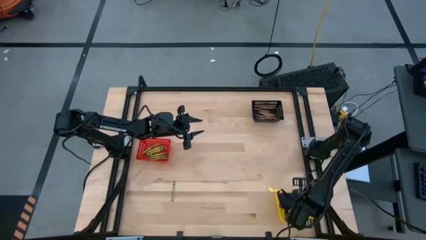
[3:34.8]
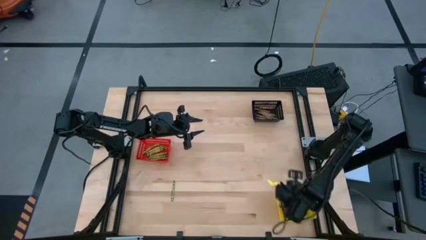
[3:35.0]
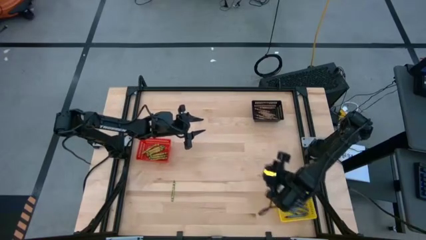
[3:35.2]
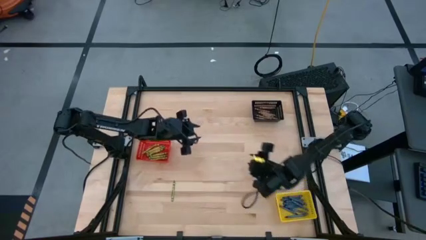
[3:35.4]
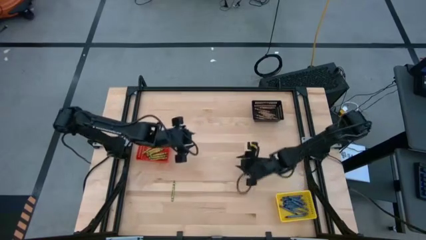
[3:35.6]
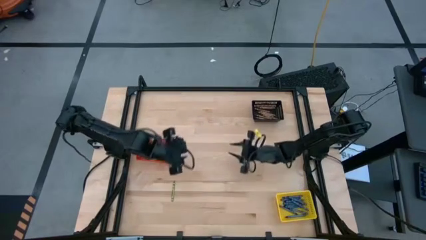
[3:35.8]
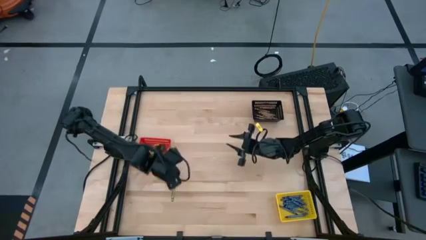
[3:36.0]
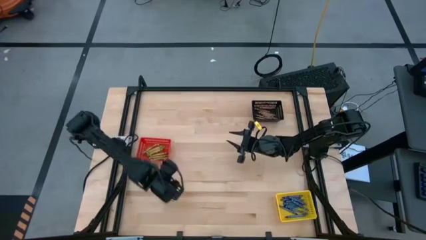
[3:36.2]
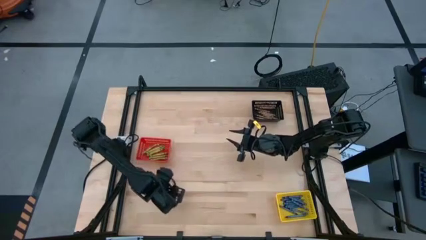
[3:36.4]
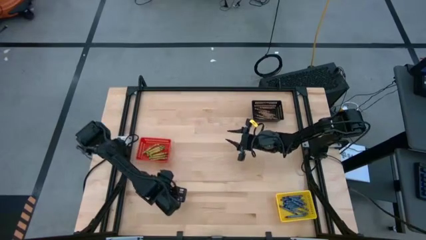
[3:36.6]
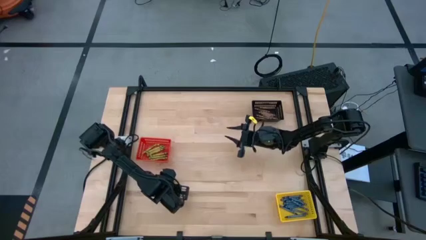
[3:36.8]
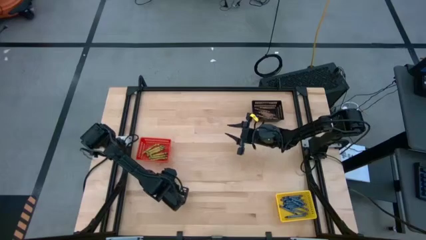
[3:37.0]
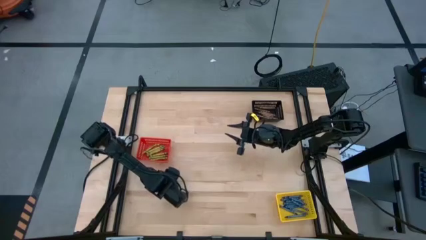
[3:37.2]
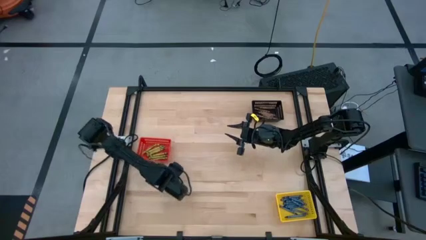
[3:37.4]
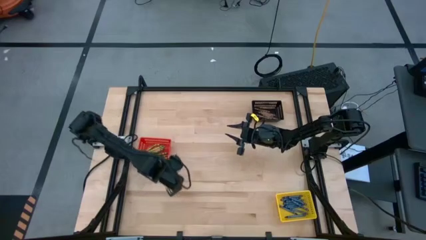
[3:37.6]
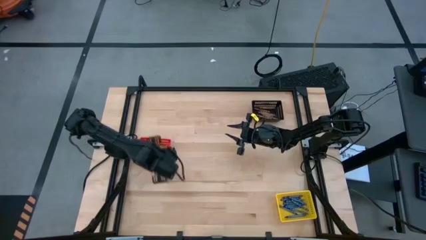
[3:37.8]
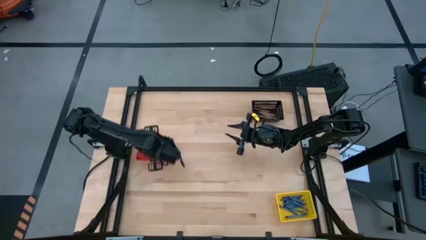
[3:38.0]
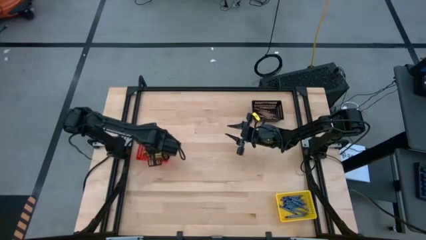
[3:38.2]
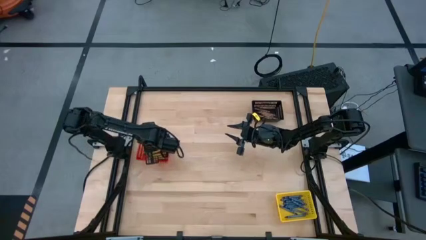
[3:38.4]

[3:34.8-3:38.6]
Task: Sort crayons
Put the green crayon into the red bin

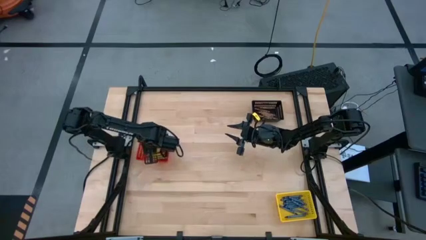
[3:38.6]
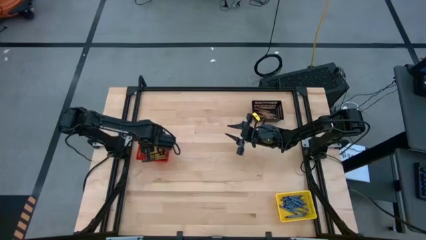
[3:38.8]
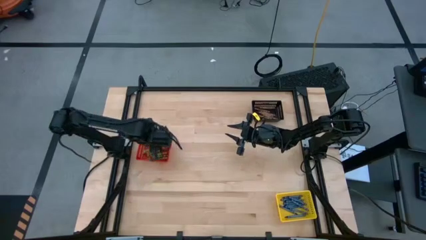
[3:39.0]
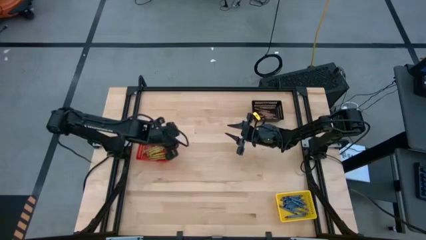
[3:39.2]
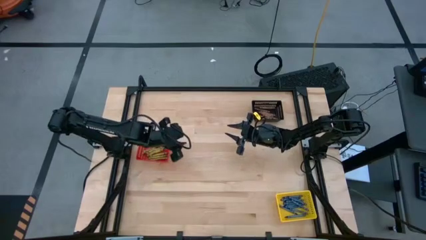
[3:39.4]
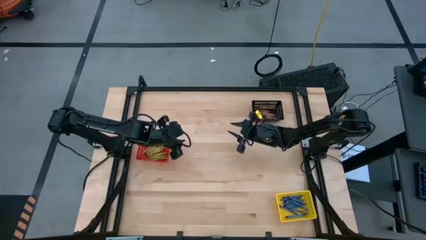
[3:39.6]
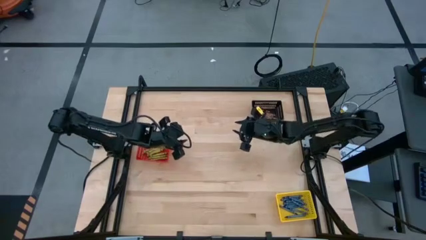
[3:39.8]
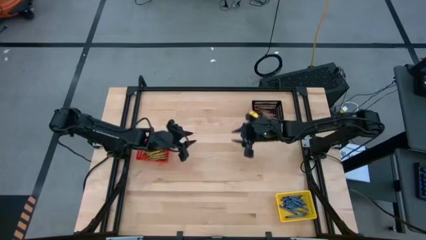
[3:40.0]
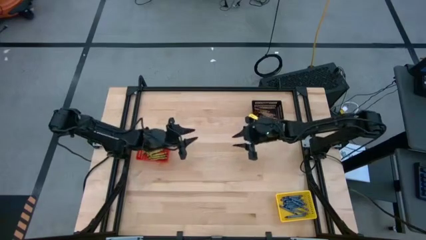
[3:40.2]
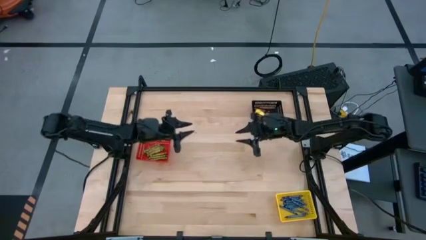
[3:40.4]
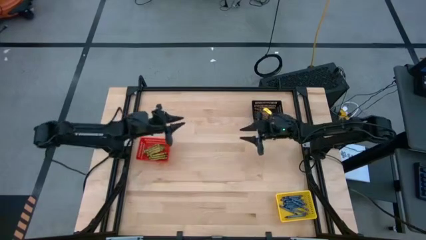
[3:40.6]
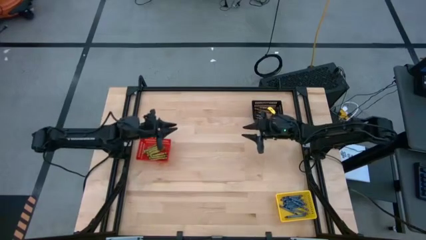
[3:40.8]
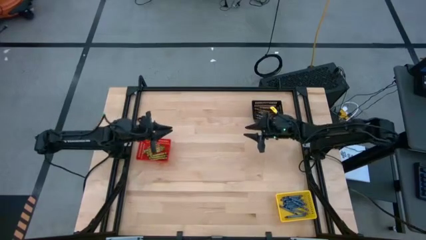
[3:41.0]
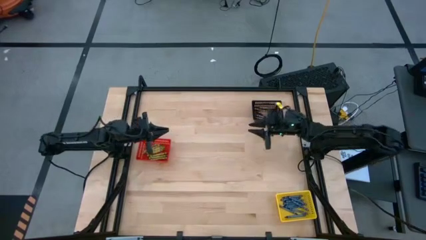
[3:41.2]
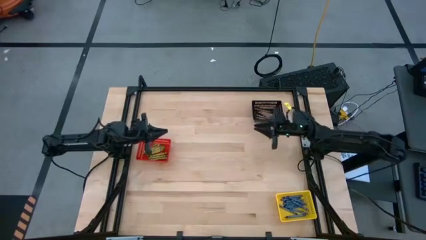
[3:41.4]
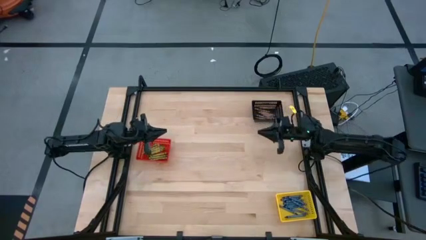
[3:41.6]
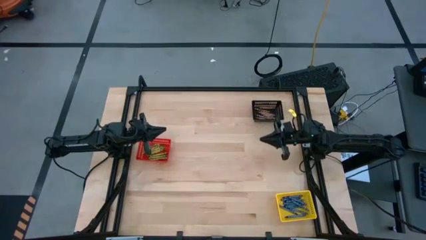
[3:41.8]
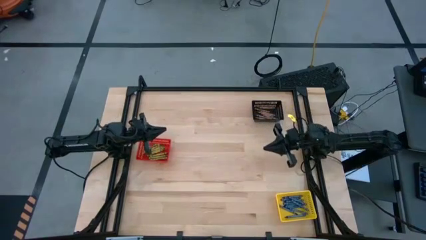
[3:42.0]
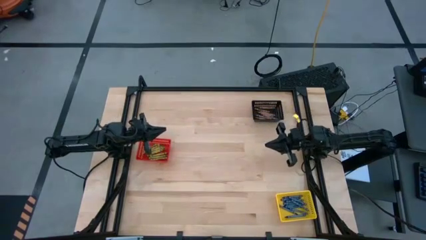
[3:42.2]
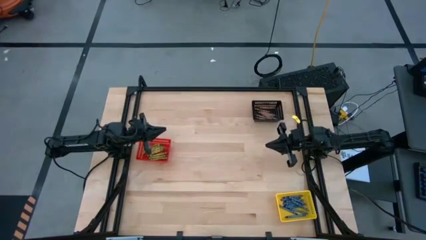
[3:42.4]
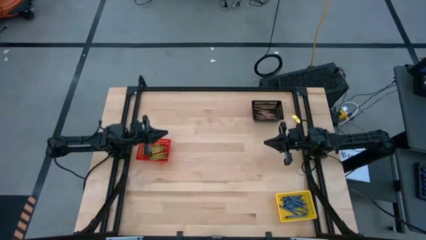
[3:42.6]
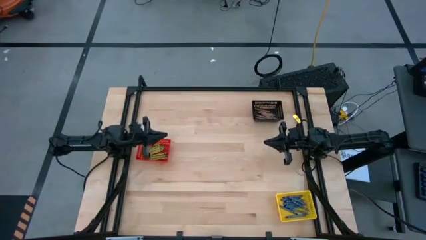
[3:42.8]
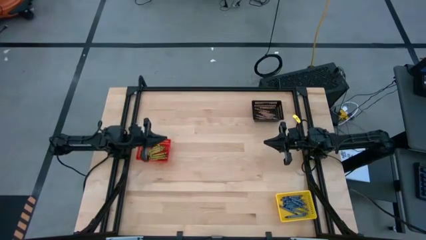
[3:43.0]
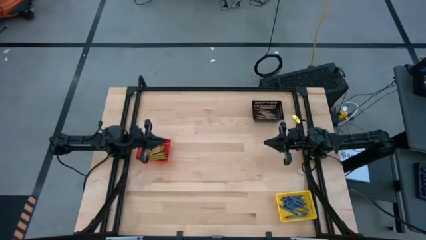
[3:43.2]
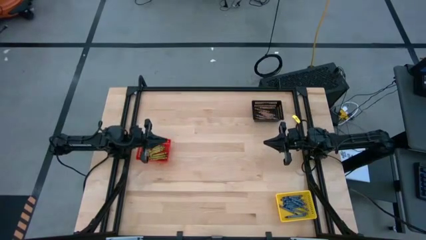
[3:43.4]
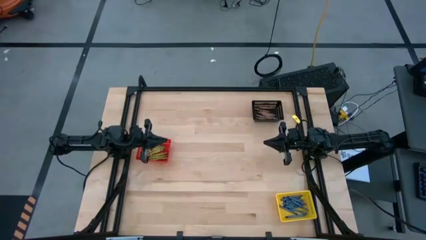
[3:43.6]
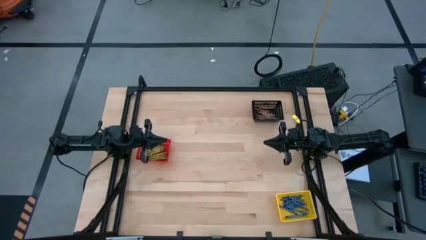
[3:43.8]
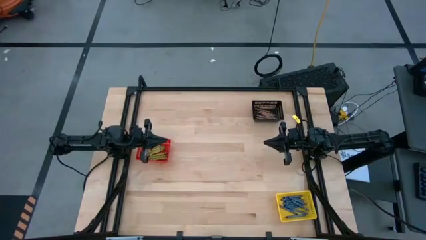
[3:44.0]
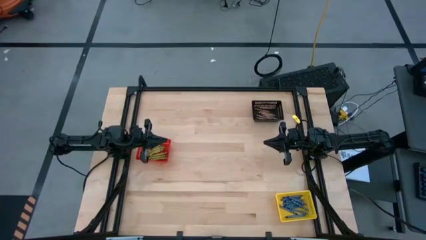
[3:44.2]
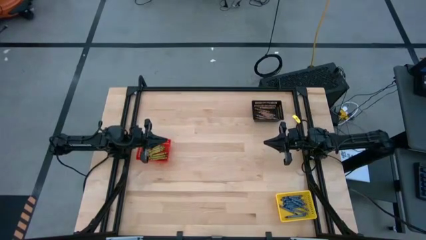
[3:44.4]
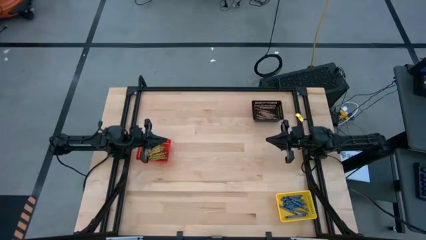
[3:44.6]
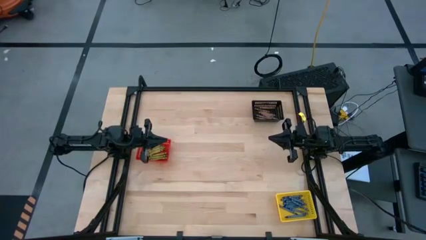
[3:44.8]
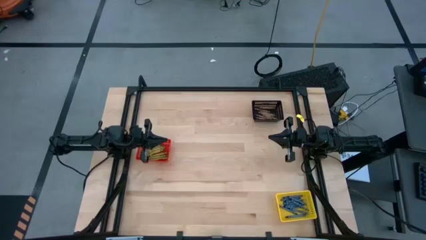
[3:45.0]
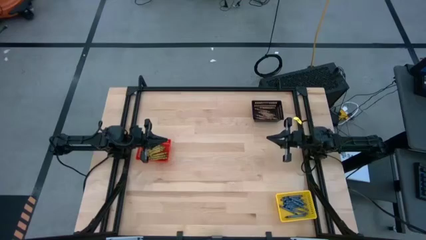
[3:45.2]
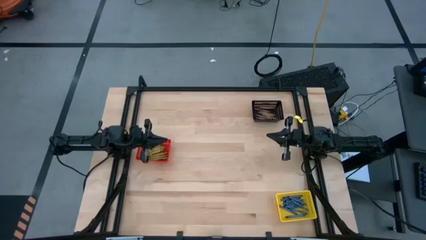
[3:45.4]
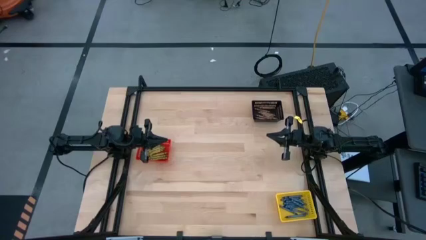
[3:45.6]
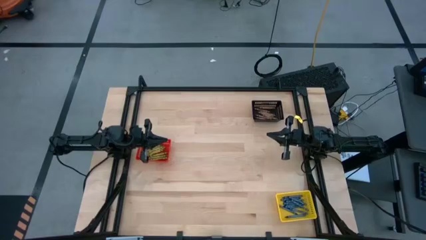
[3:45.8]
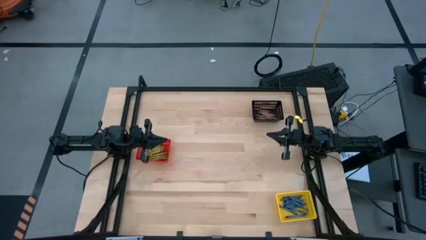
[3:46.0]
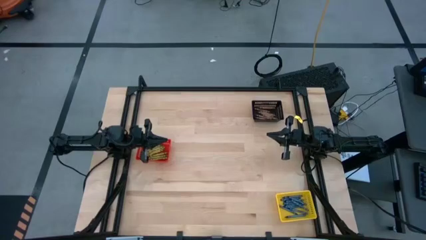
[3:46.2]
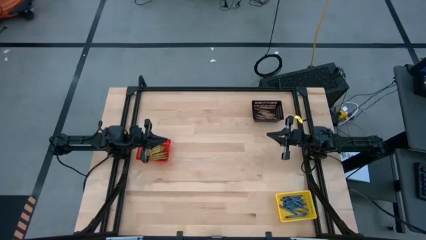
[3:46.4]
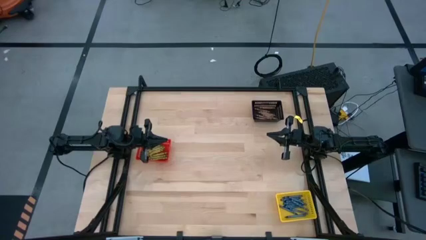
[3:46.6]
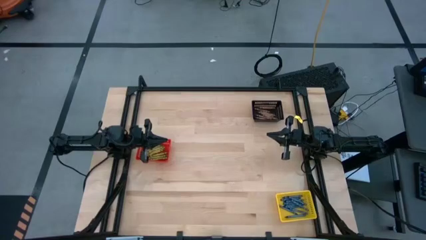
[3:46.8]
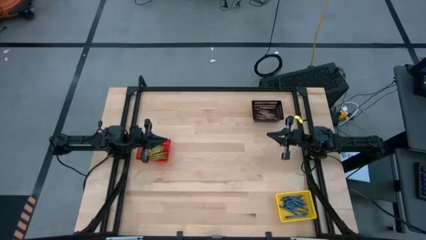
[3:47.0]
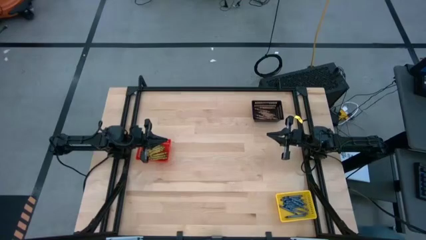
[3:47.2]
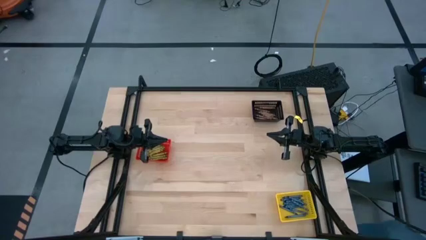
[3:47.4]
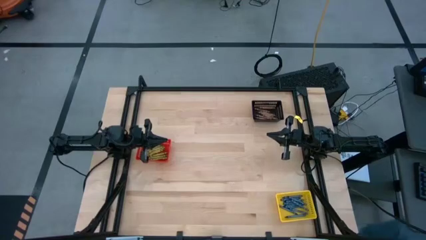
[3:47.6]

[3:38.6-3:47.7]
Return to Home Position

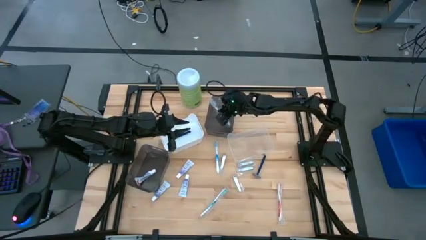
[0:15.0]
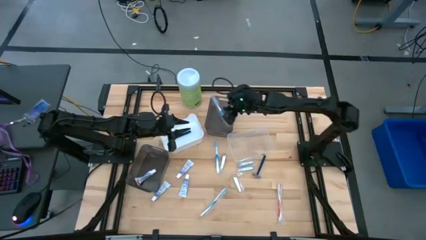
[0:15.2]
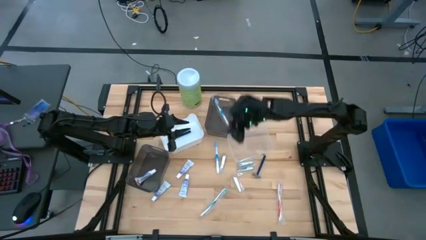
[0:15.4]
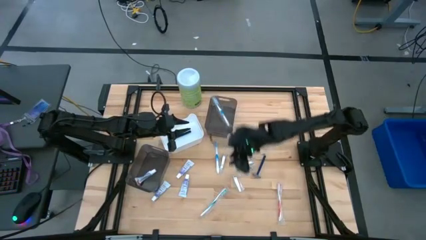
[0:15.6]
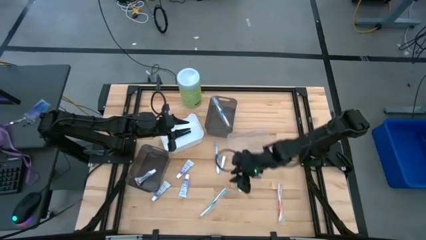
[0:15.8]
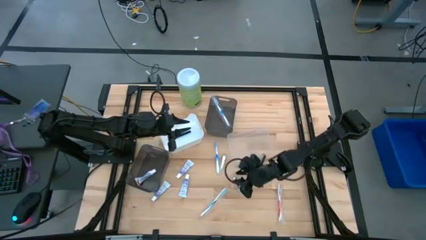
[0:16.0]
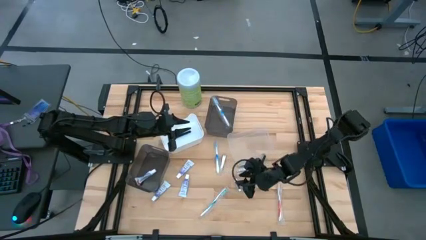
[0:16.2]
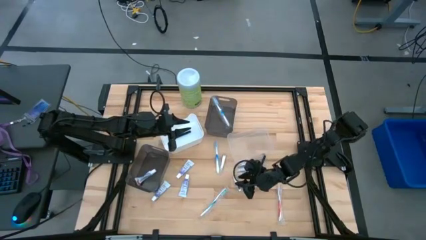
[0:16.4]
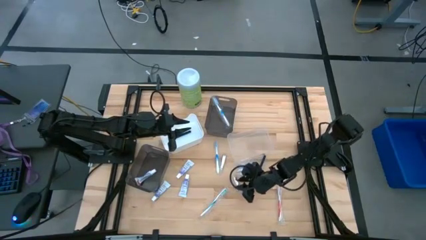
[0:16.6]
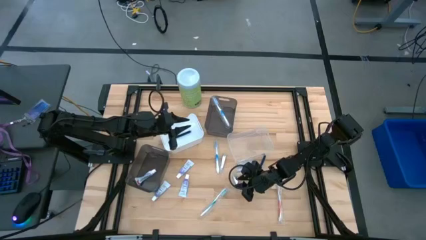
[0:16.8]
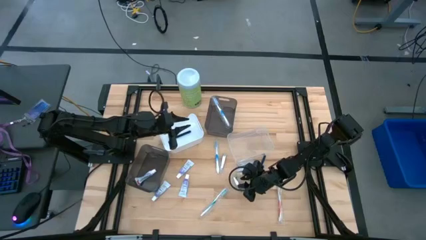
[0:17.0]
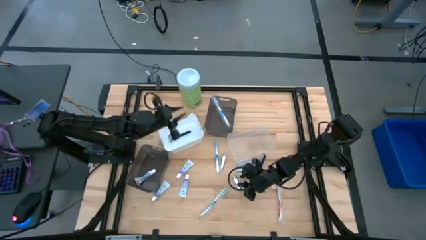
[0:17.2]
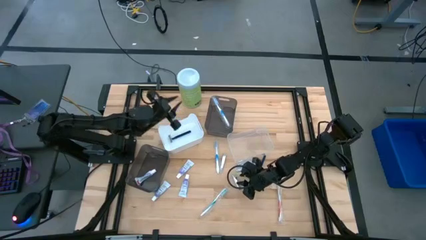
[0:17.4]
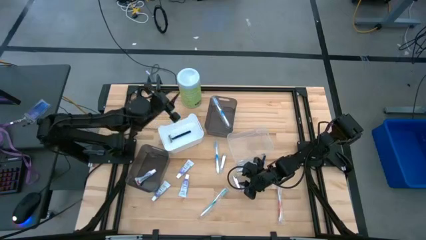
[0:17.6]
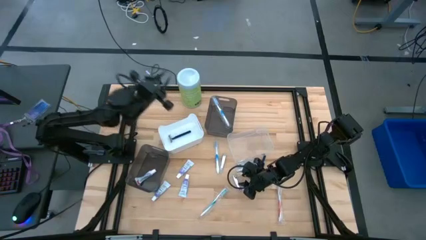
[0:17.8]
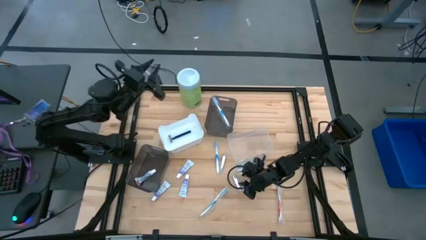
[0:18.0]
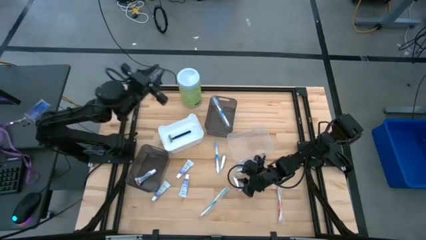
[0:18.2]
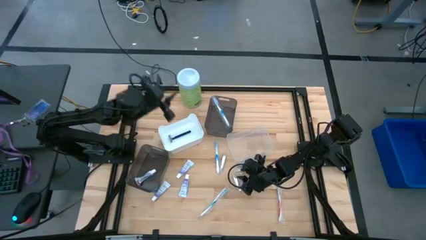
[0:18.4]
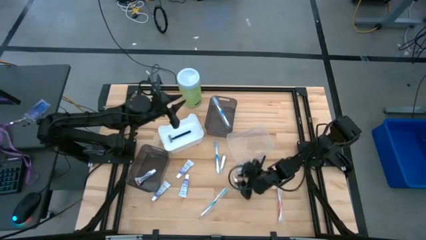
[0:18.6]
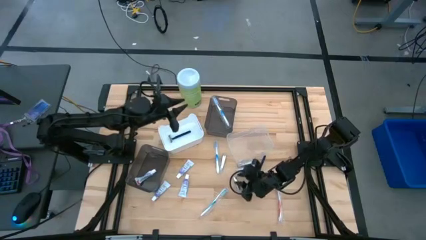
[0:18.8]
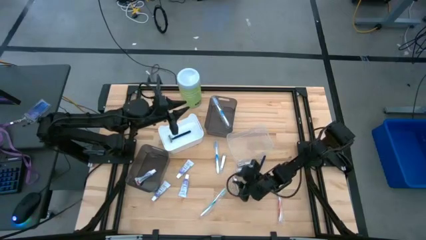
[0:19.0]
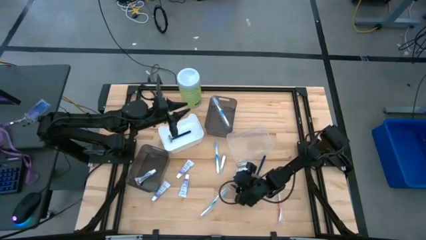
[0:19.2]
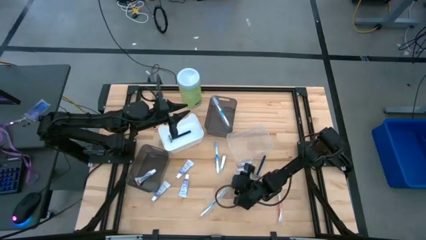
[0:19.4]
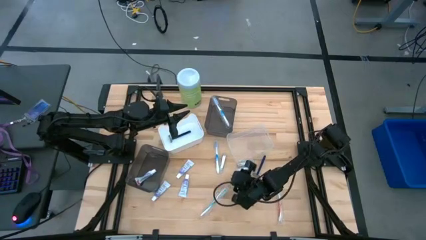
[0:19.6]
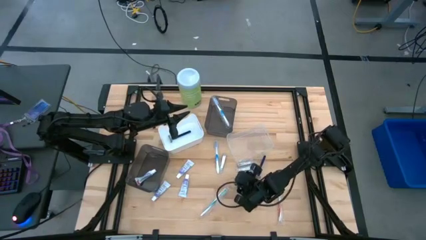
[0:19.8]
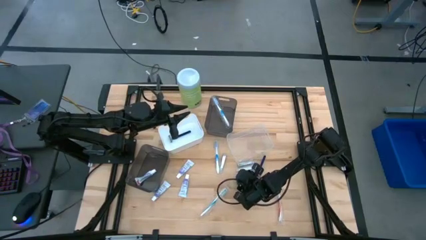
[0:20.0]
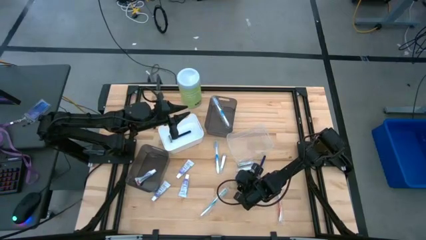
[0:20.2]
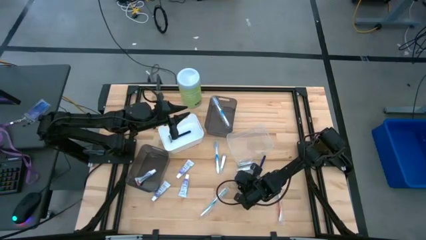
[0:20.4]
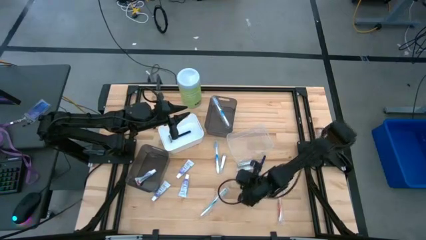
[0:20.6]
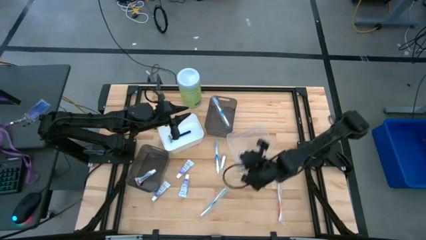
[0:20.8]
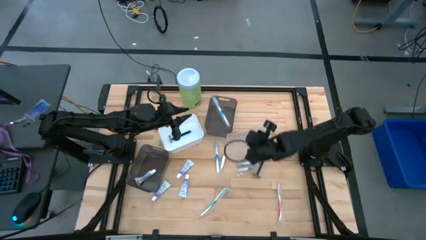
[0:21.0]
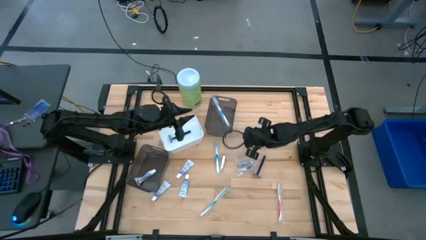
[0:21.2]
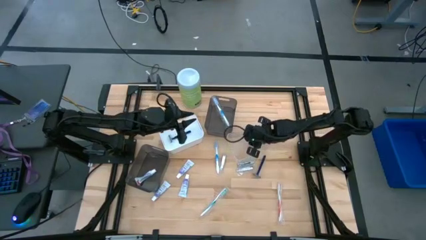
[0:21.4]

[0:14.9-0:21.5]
Task: Pick & Place Travel size toiletries
Put the silver nail cutter into the transparent bin
